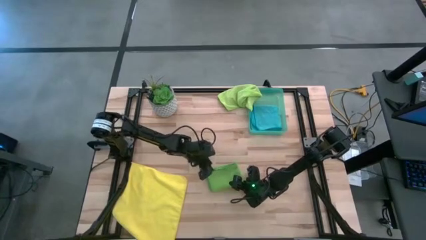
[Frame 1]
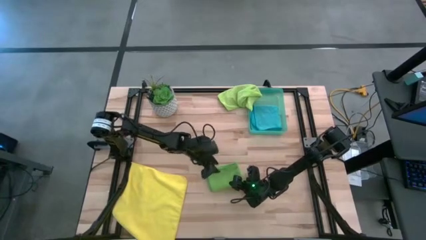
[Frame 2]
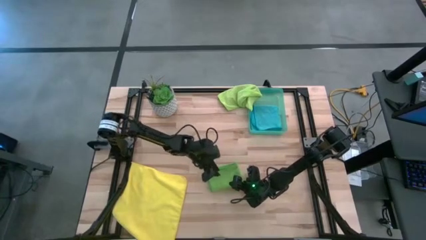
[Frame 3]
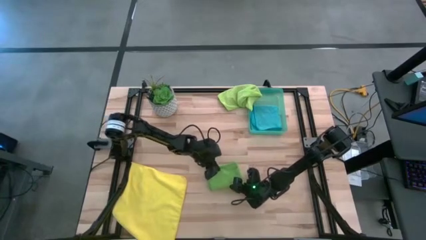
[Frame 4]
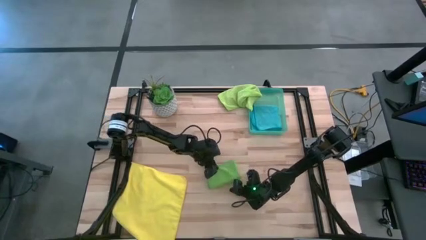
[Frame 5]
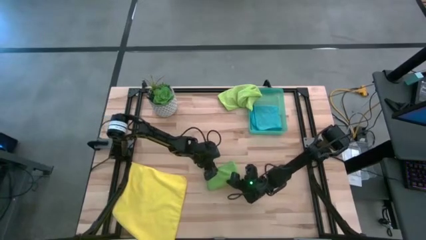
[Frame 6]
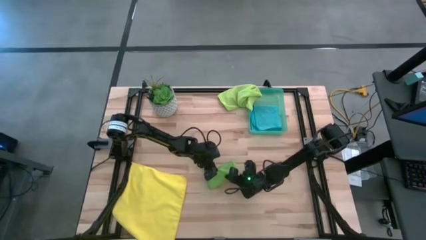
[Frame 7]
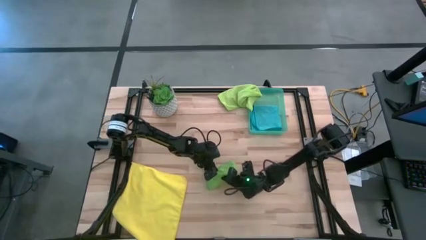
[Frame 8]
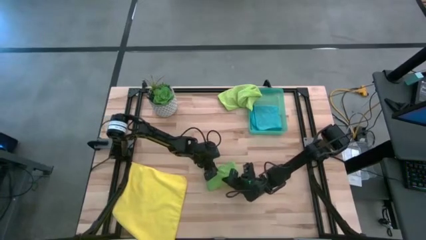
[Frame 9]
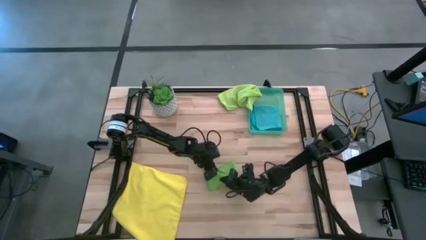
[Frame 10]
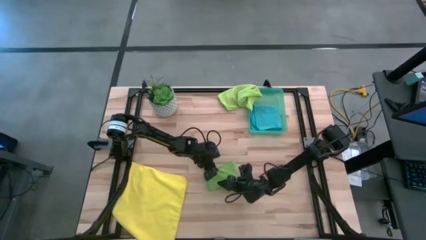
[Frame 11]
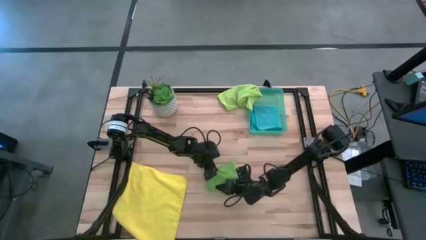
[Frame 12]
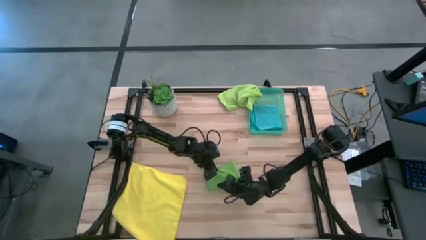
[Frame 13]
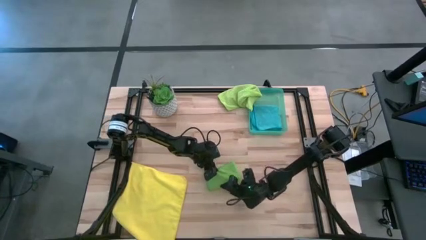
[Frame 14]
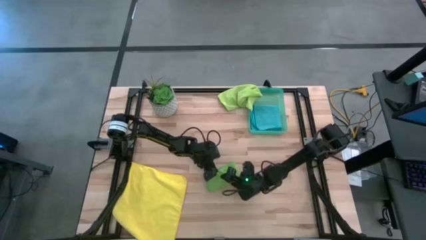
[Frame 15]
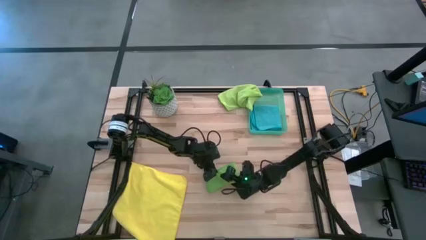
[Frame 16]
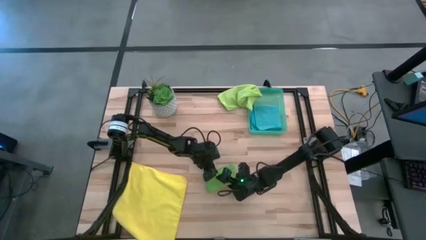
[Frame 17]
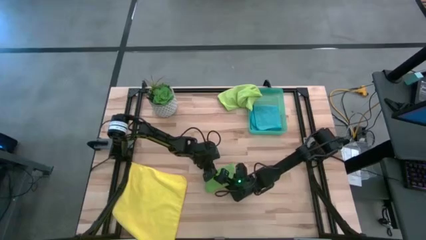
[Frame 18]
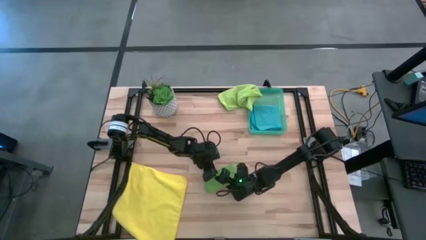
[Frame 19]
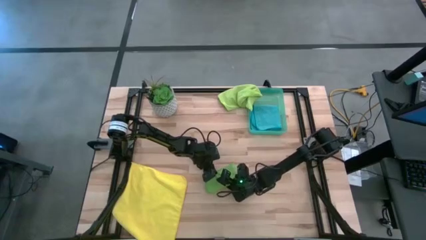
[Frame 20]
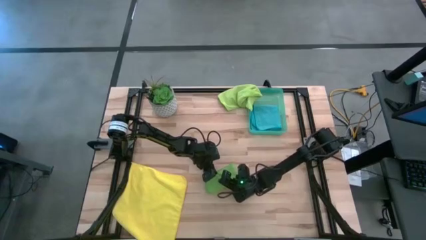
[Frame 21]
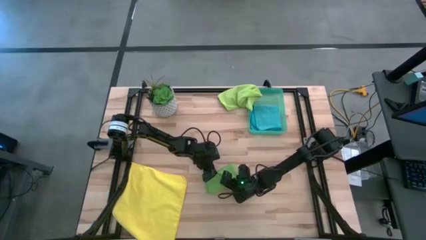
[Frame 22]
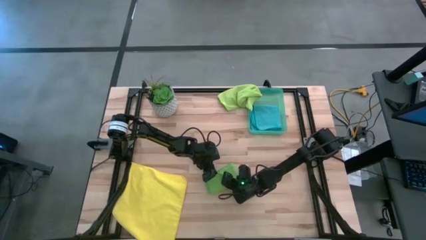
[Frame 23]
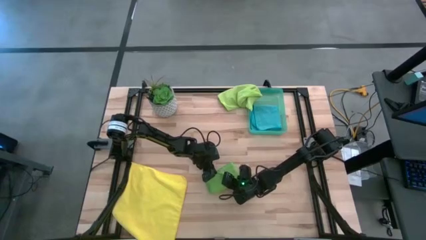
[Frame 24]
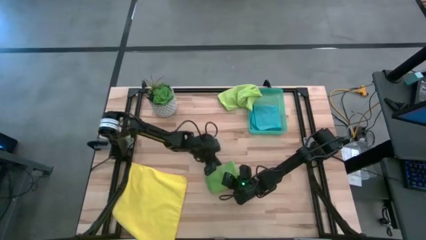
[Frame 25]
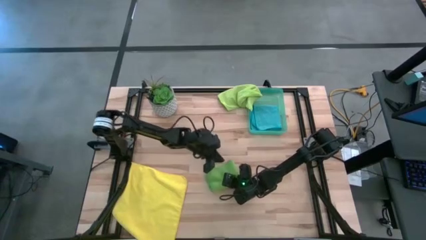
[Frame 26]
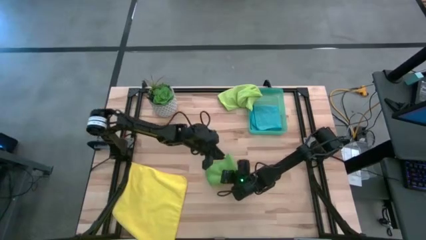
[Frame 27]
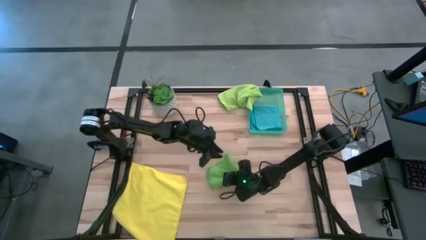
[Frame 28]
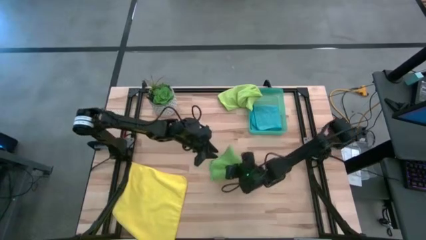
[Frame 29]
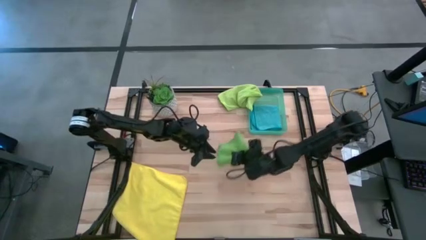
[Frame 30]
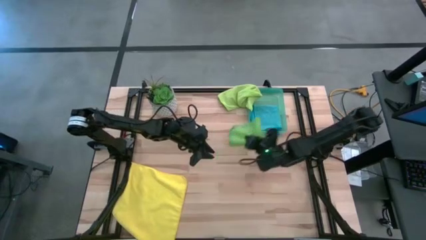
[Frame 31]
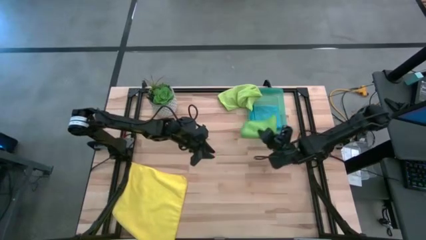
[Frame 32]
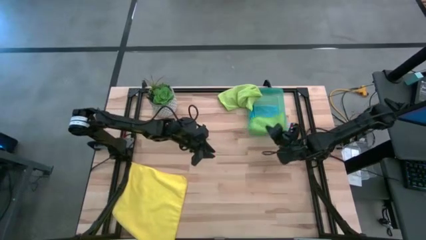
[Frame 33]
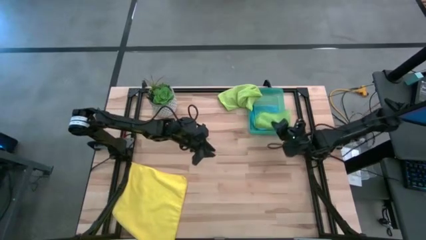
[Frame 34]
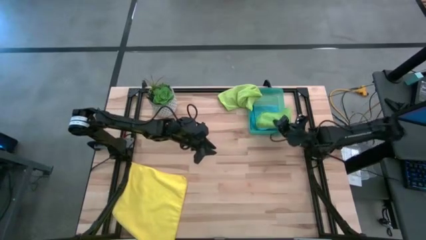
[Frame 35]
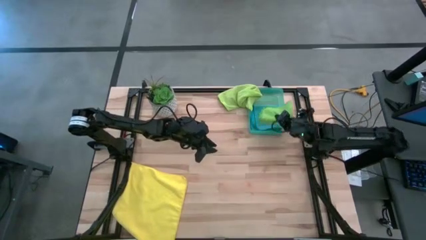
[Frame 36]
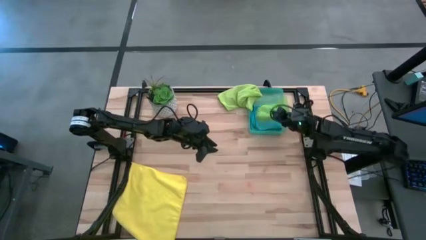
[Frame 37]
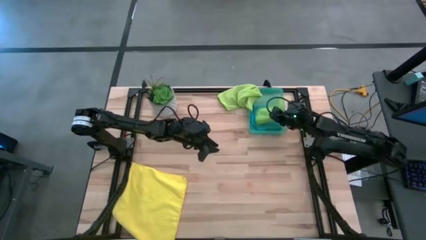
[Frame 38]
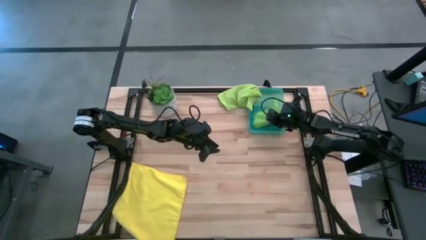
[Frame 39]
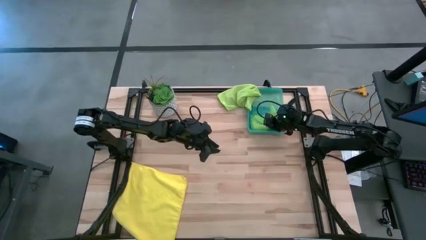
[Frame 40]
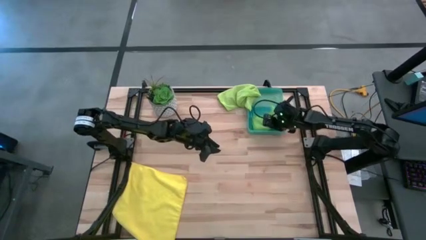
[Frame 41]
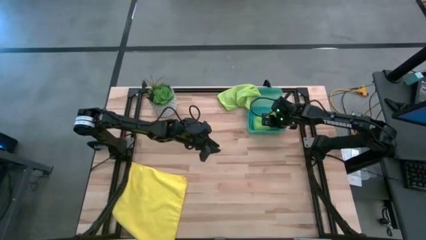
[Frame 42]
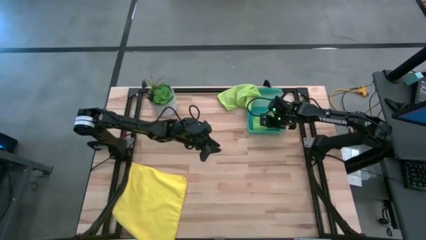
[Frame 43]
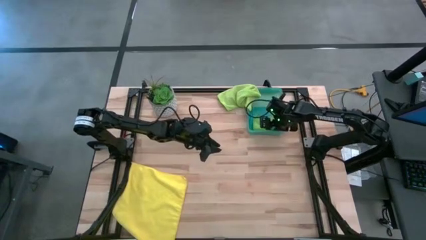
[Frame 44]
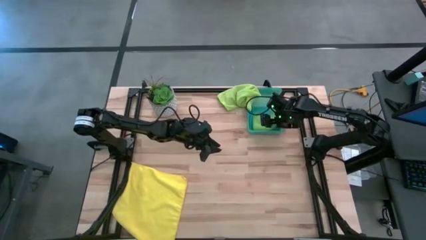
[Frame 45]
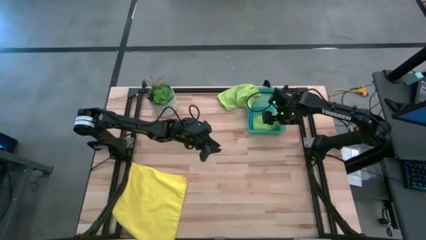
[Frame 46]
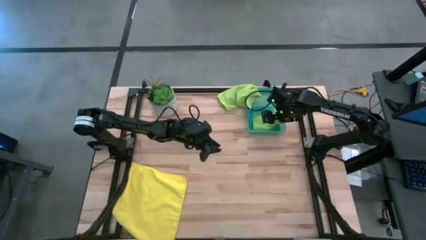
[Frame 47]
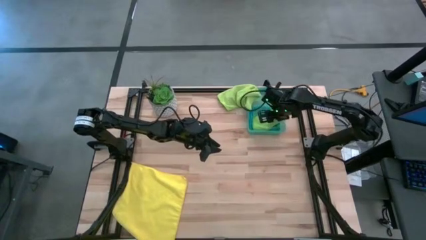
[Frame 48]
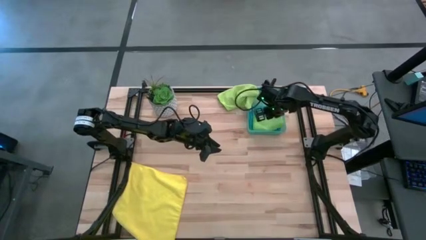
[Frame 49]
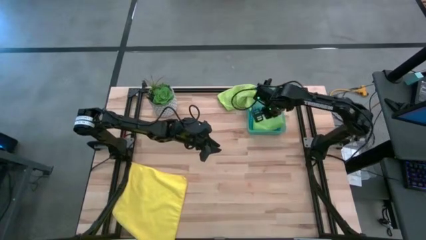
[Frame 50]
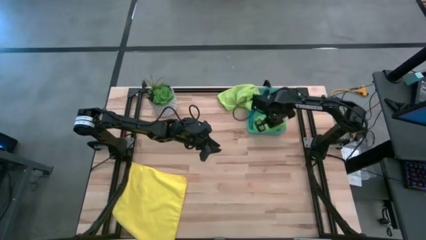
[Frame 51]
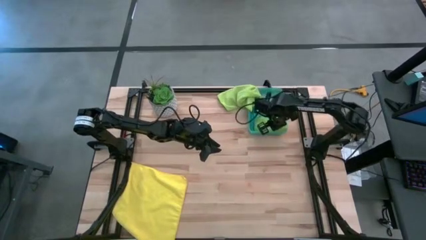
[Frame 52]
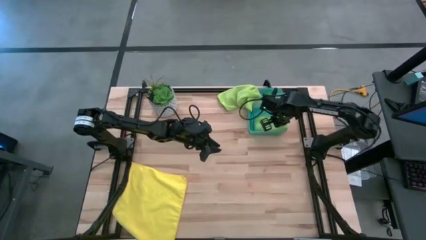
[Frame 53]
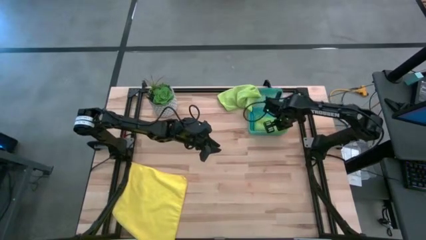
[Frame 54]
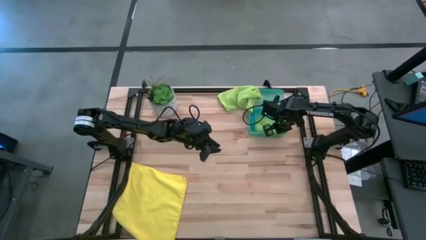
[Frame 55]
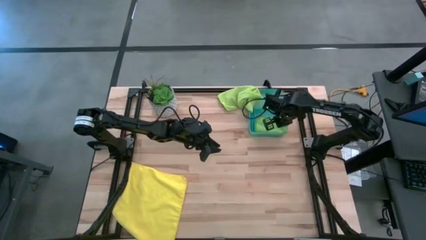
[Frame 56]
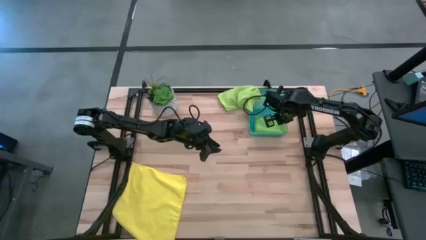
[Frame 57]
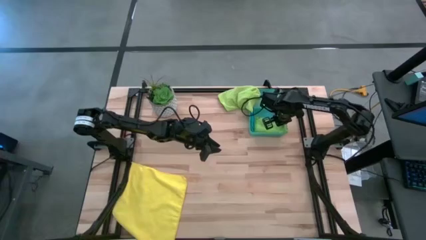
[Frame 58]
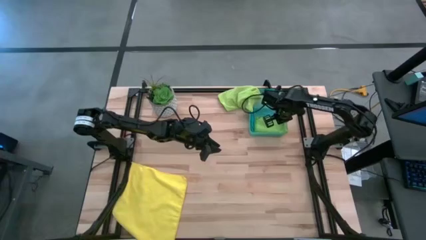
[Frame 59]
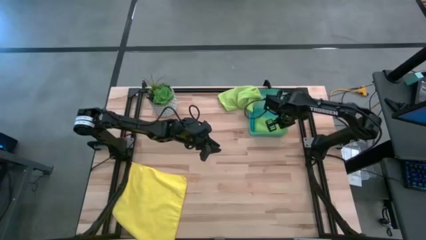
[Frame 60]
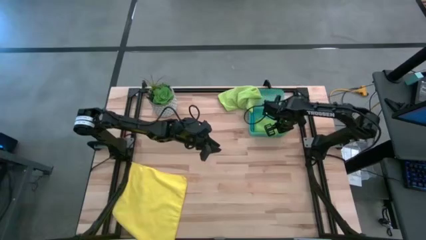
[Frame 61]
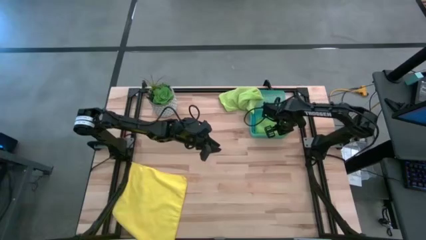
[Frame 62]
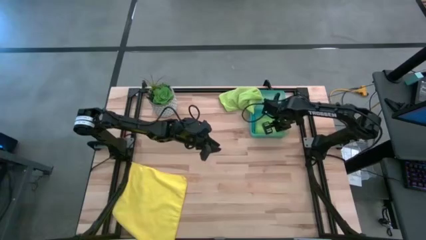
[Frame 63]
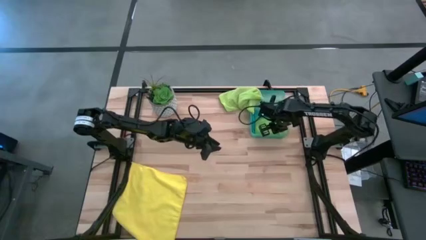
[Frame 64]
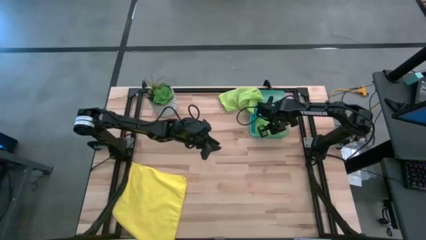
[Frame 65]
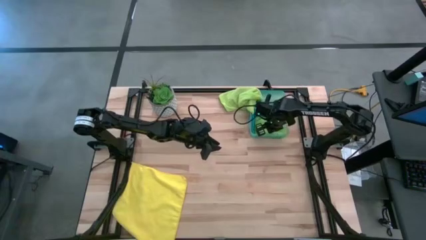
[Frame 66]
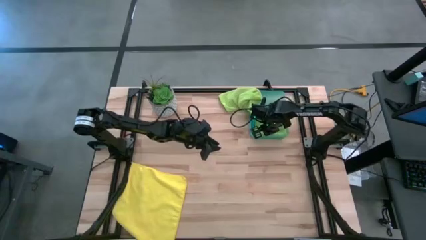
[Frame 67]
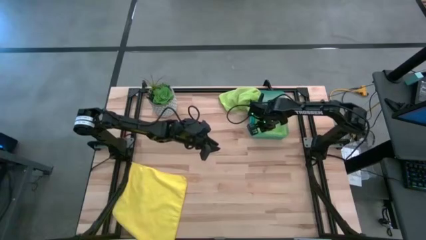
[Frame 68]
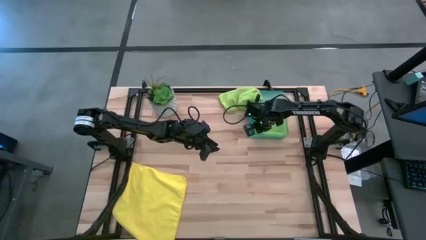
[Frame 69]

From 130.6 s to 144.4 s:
Task: Fold microfiber towels
Put the green towel on top of the blue towel in the container

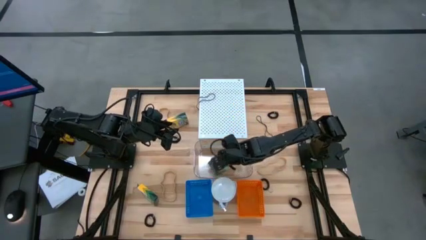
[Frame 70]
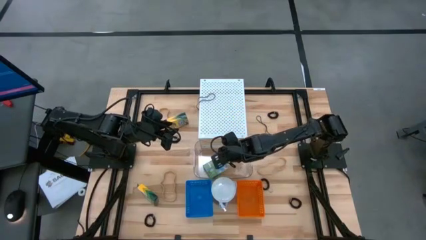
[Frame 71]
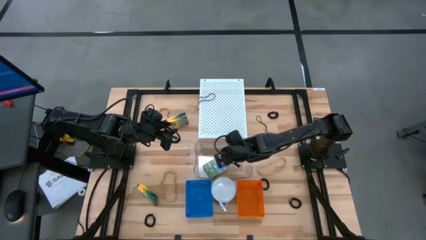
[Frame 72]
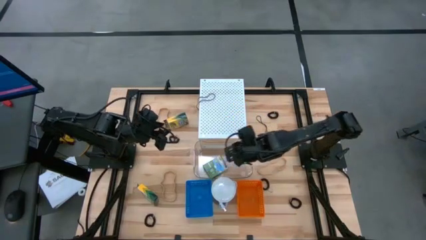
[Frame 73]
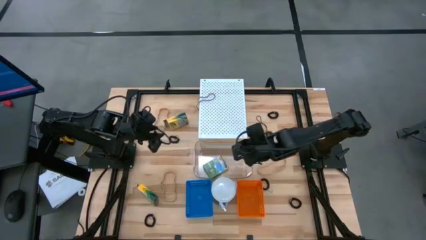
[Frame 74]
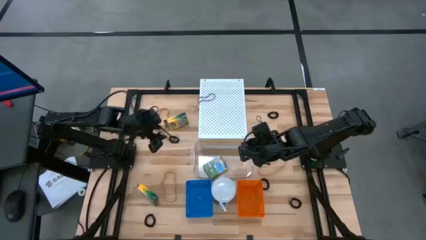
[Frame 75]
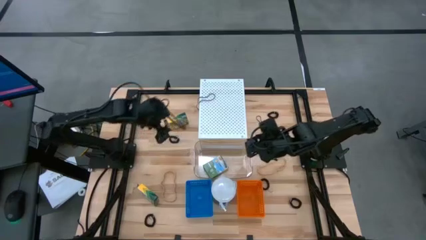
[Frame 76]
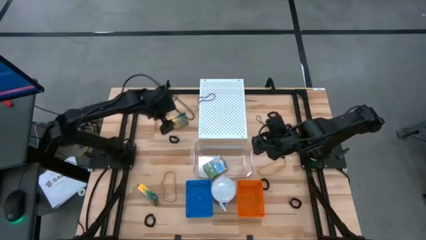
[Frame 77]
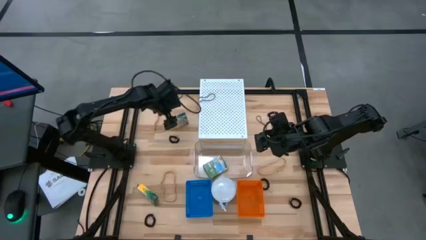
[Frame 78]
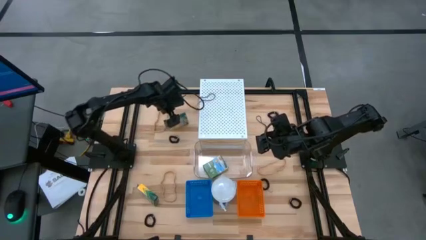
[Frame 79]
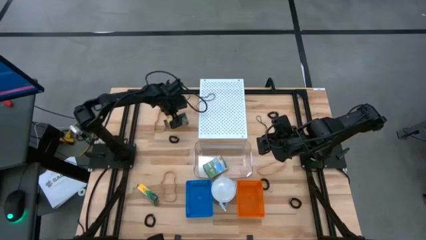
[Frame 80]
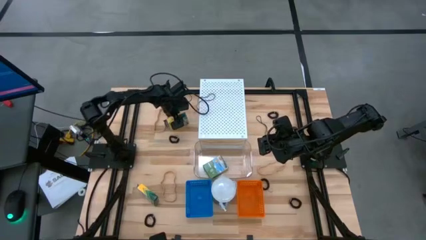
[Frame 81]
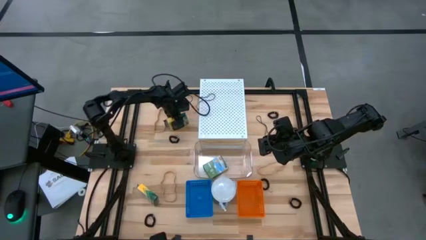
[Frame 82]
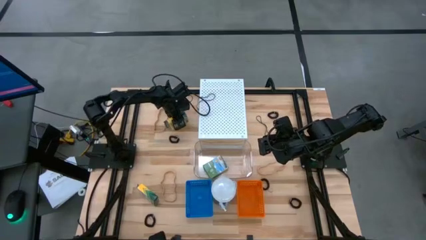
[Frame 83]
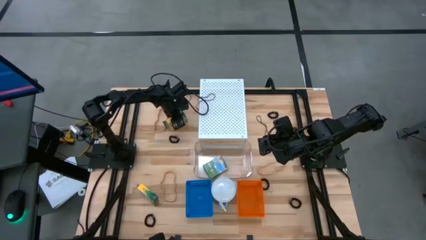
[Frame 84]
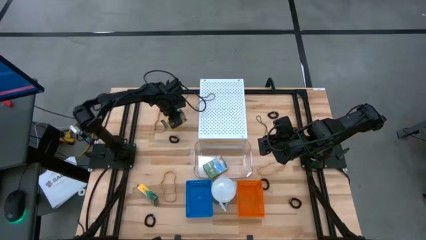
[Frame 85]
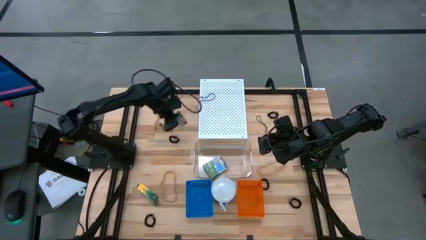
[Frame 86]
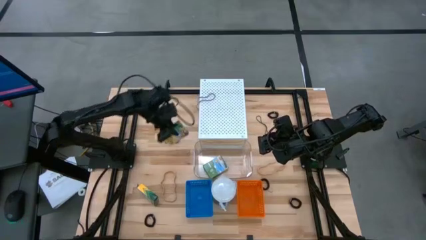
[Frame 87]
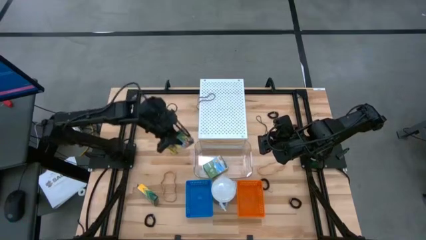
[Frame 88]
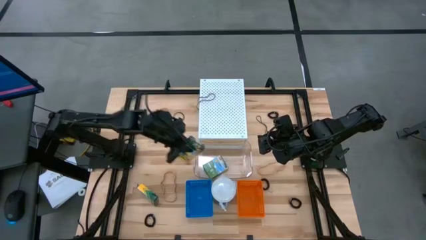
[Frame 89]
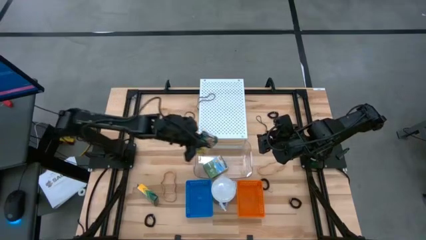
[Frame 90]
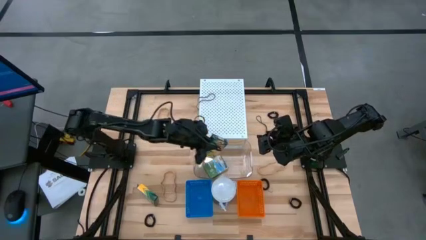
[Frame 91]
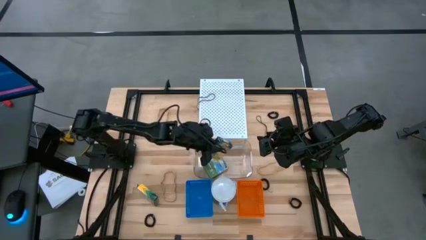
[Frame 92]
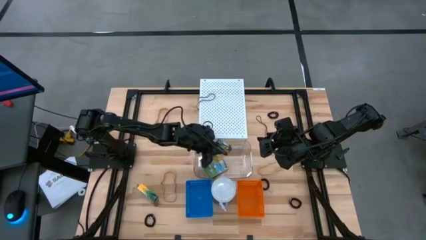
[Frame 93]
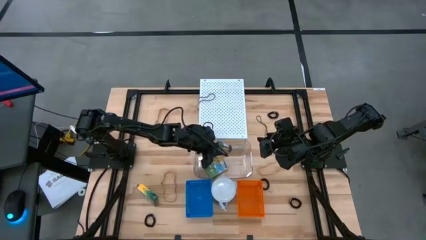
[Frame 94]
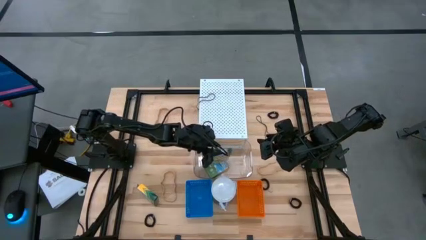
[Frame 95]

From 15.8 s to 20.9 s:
Task: Pick & Place Office Desk Supplies
Put the crayon box into the transparent bin
